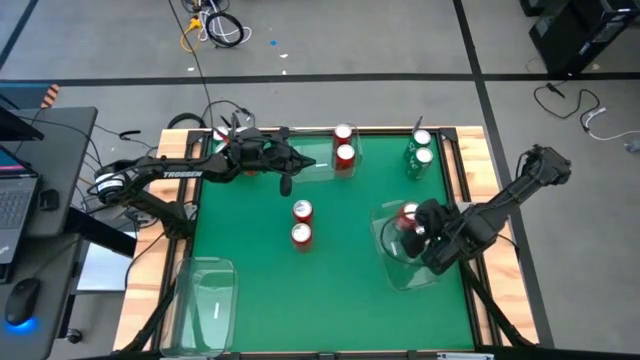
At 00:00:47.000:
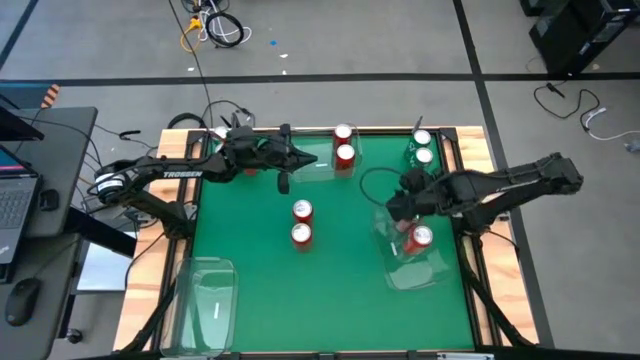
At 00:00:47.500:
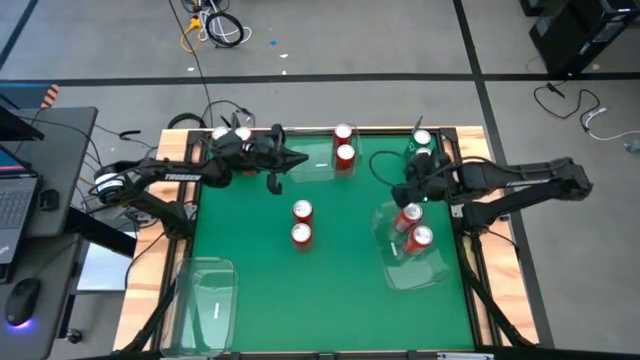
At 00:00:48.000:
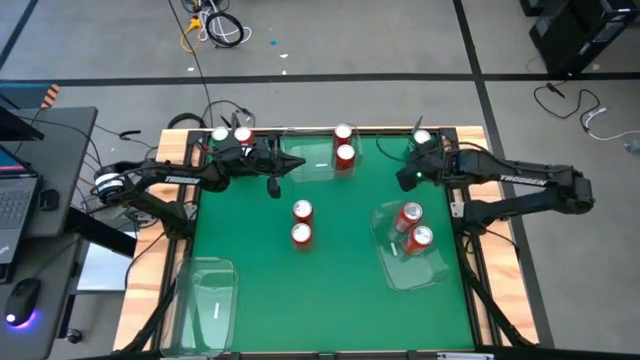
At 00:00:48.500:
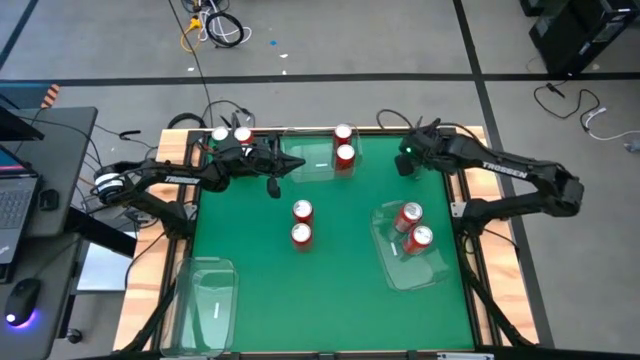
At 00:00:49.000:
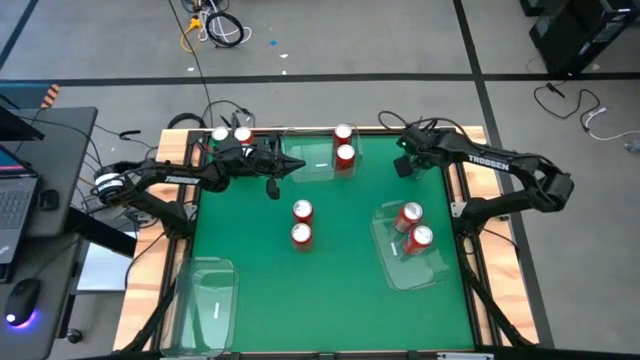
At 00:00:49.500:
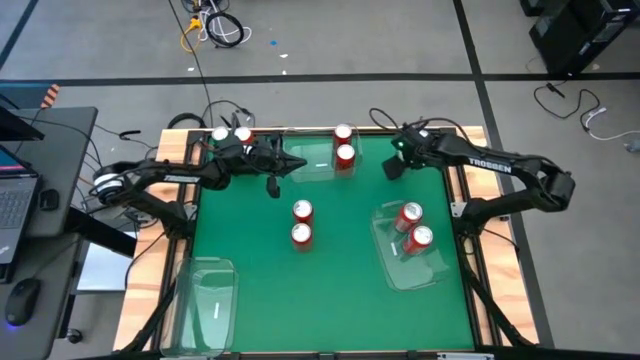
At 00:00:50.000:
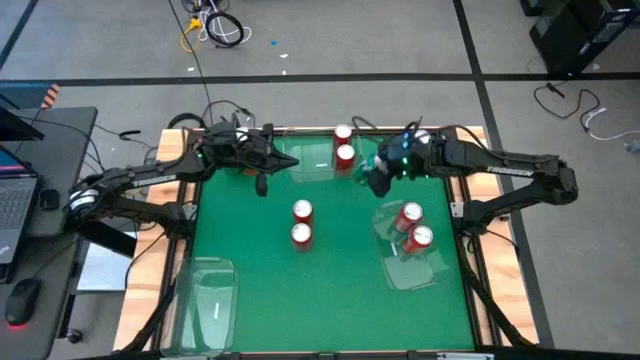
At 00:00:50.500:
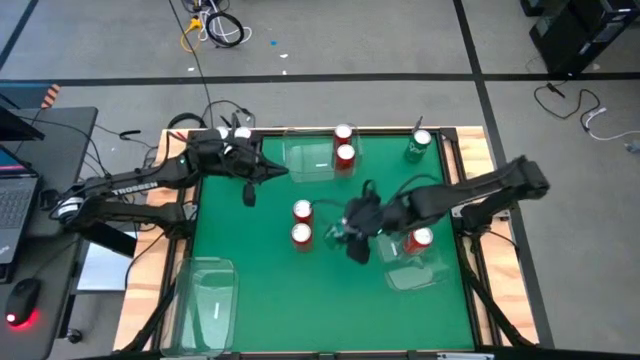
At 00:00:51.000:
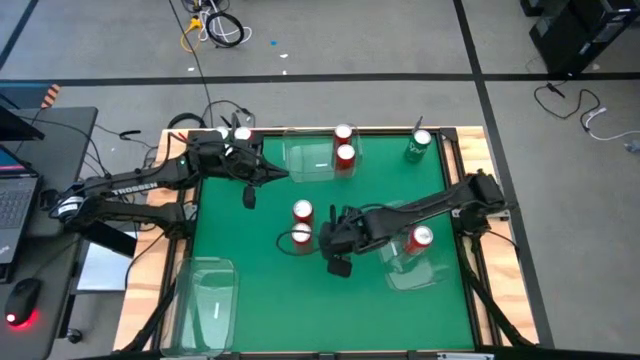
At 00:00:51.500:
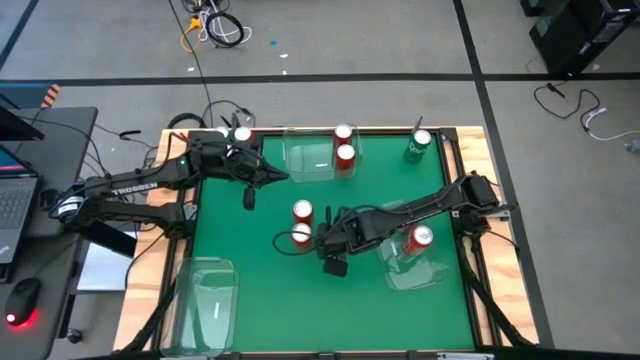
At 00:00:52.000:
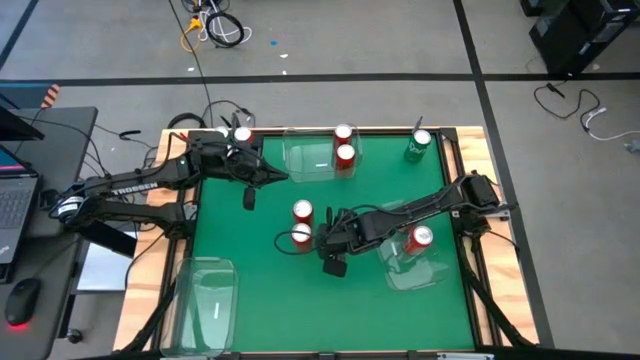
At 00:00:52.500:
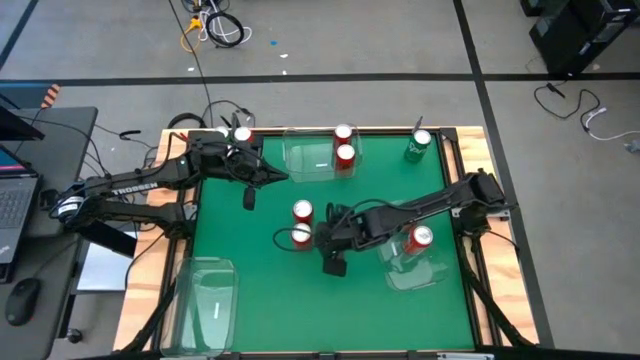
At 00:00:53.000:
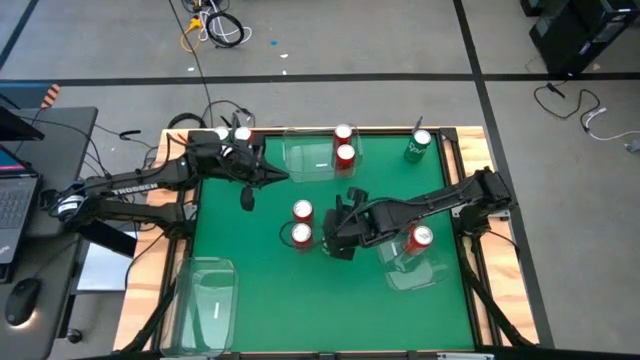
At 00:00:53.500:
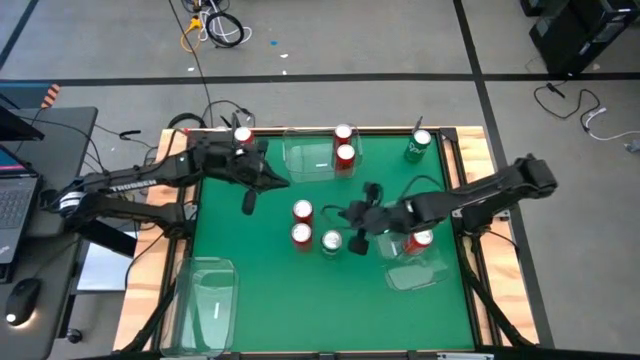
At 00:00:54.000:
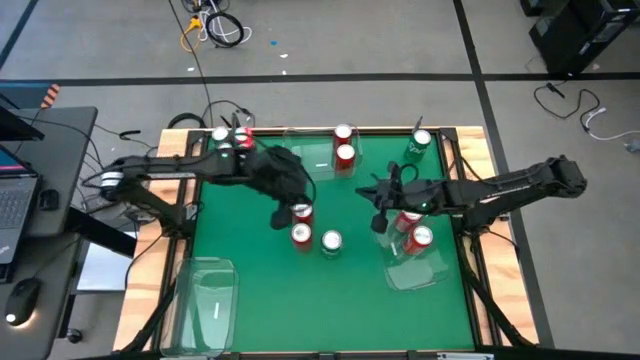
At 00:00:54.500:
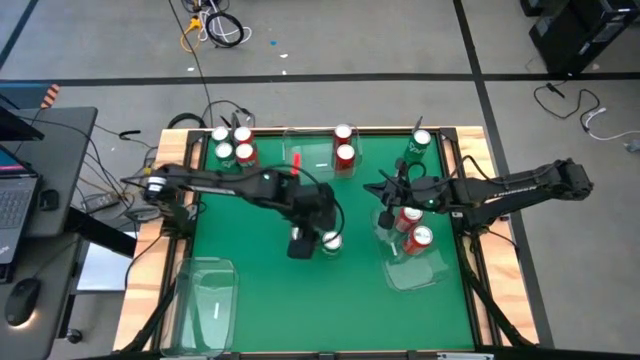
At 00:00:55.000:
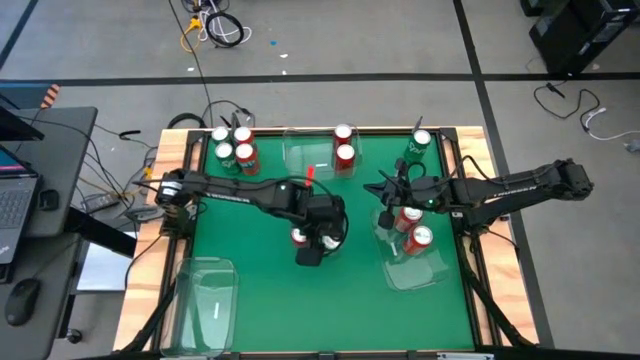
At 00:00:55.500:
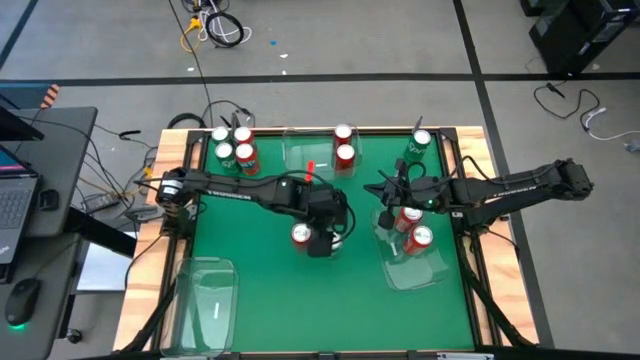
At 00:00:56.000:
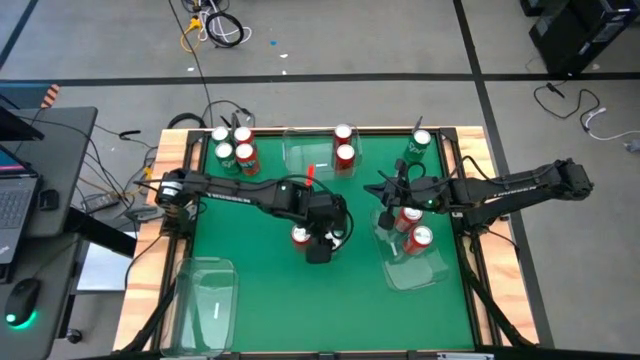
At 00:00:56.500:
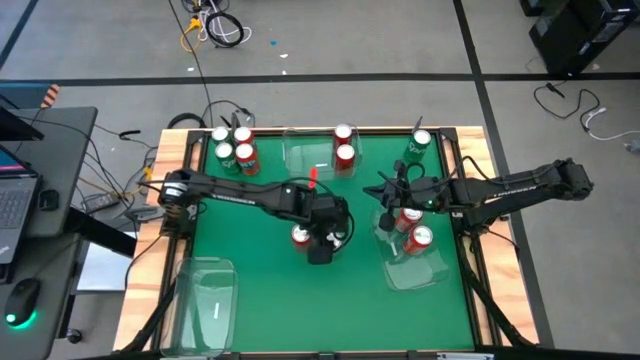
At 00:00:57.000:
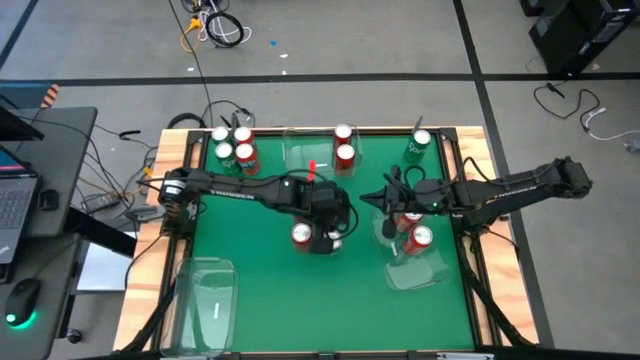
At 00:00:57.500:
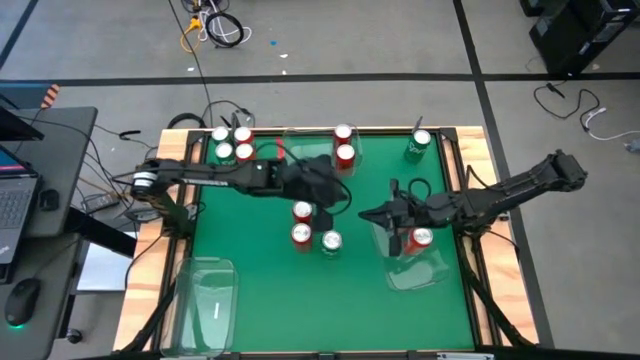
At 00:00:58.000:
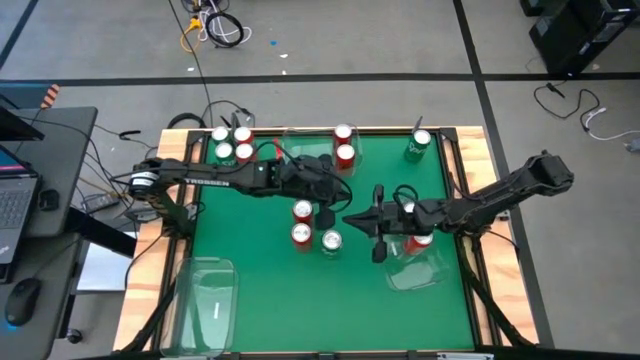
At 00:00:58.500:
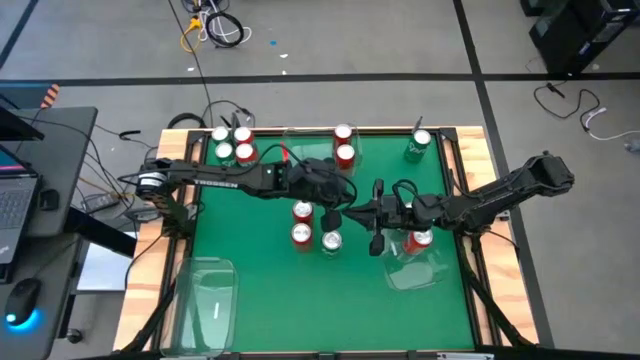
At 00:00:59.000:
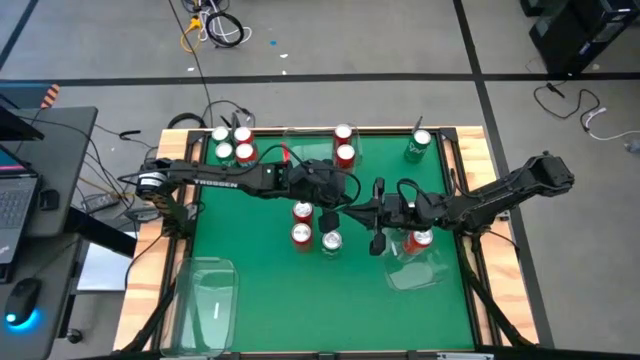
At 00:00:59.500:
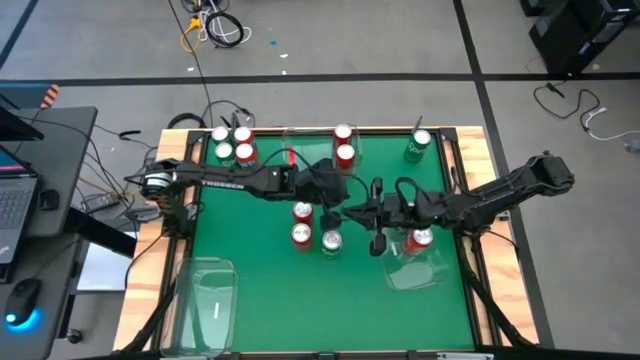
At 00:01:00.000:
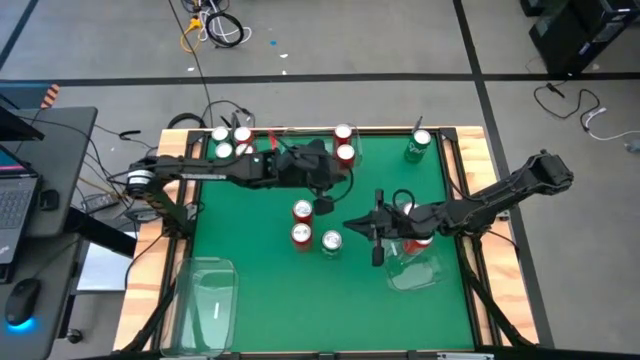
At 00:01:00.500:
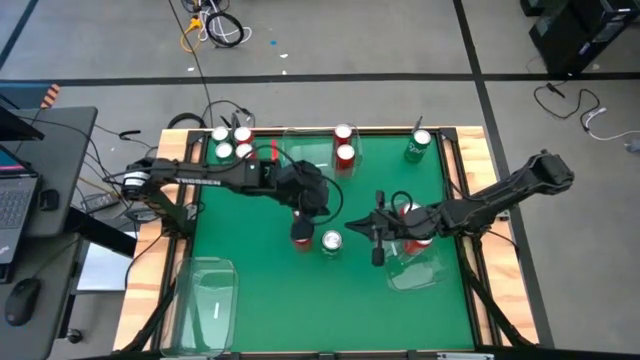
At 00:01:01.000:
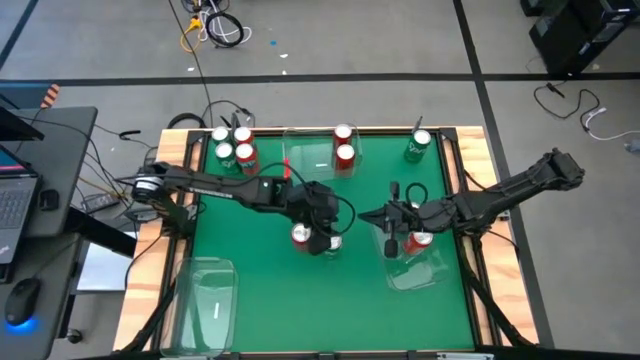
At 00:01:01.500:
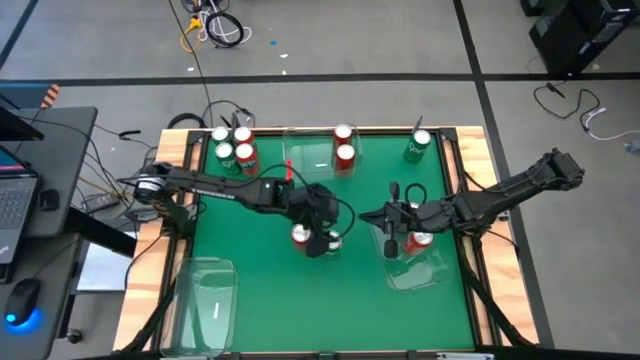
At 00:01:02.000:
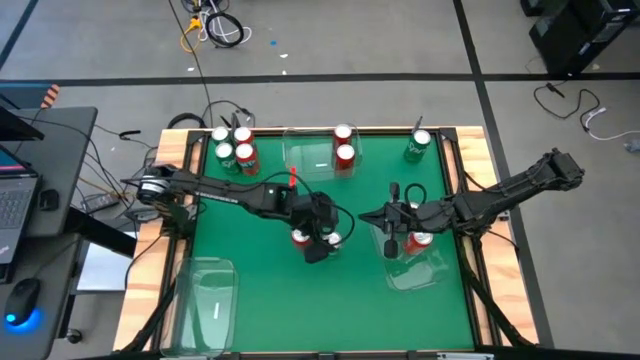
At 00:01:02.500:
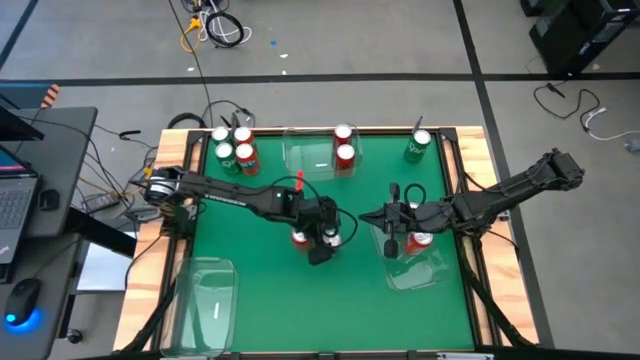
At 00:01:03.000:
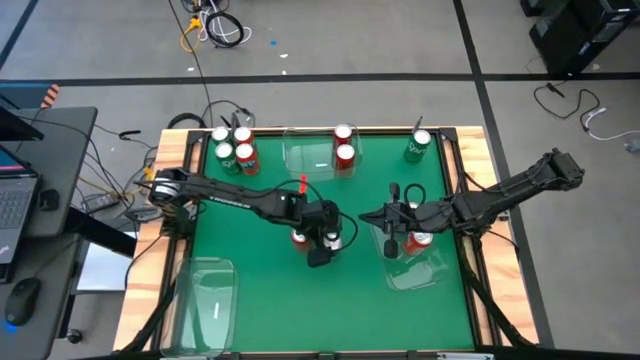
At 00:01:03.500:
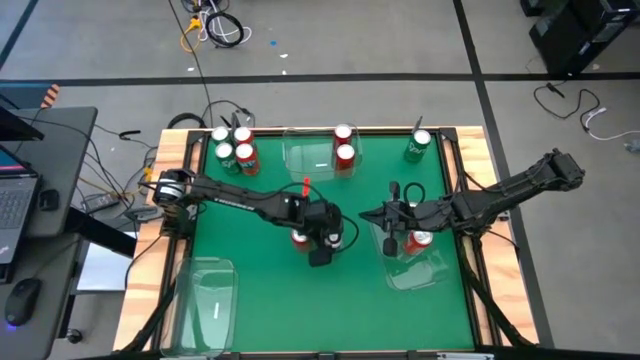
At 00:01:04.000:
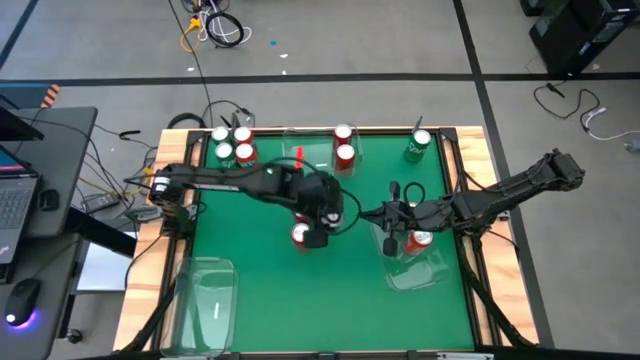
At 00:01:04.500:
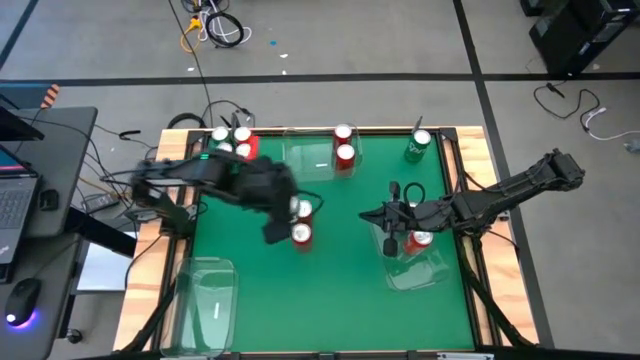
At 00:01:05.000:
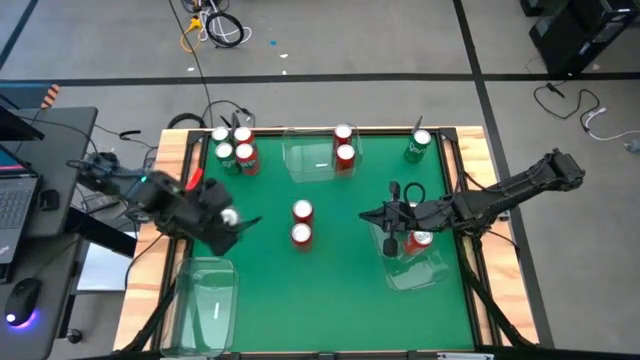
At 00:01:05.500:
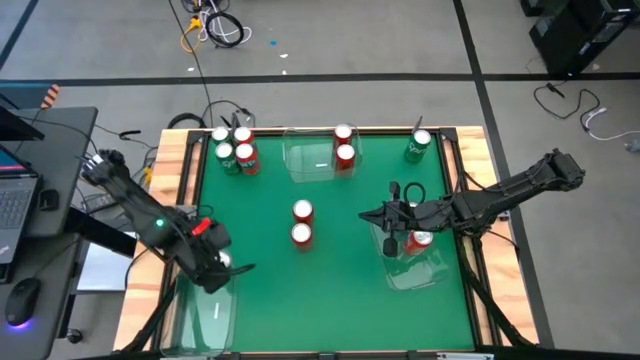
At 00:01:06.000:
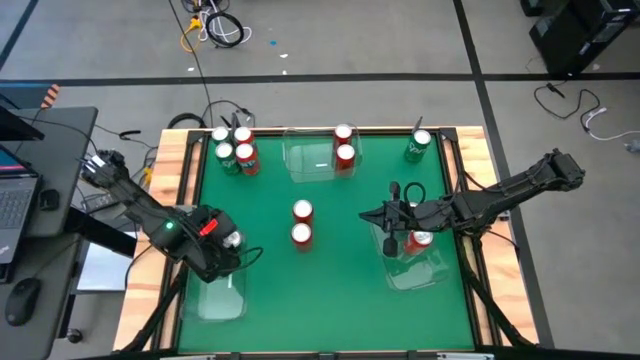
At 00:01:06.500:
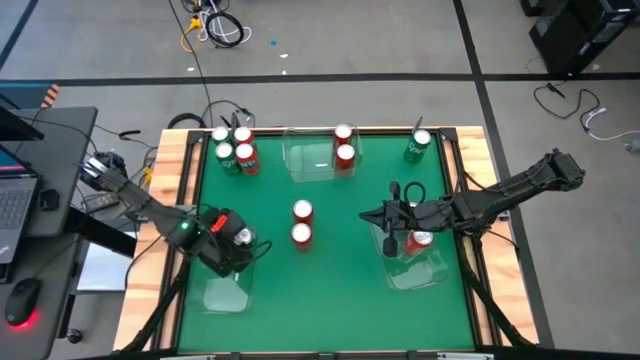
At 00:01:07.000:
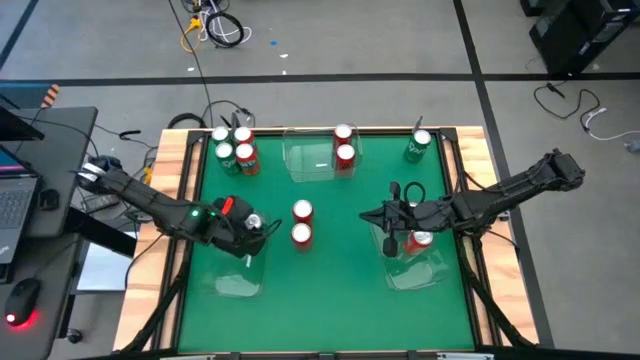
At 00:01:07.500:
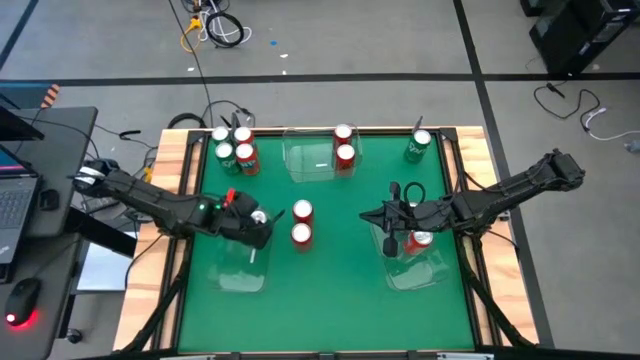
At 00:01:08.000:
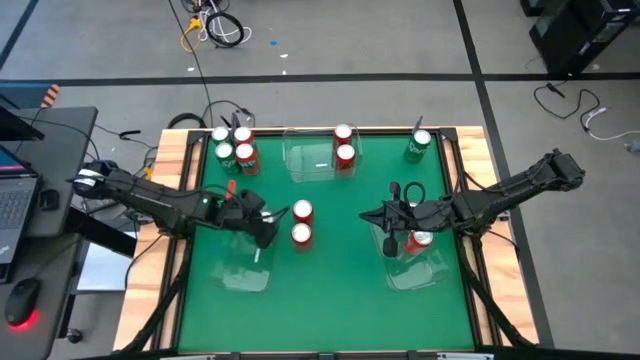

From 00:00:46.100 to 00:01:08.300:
Task: Sort soda cans
Put the green soda can into the middle left transparent bin
